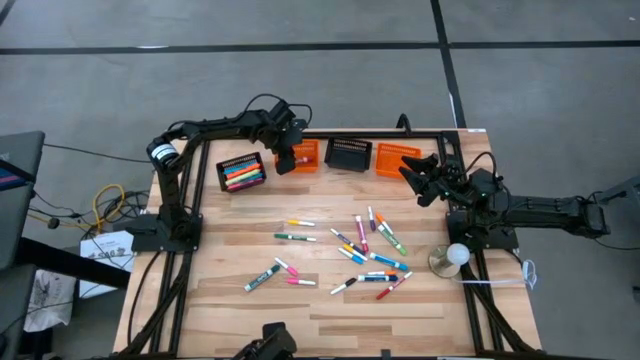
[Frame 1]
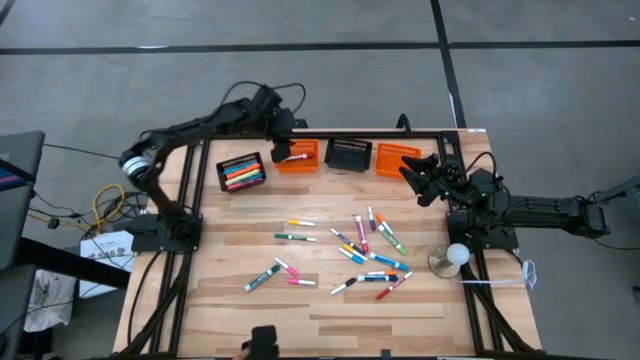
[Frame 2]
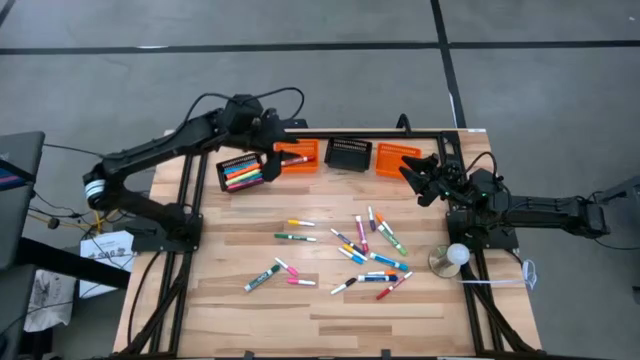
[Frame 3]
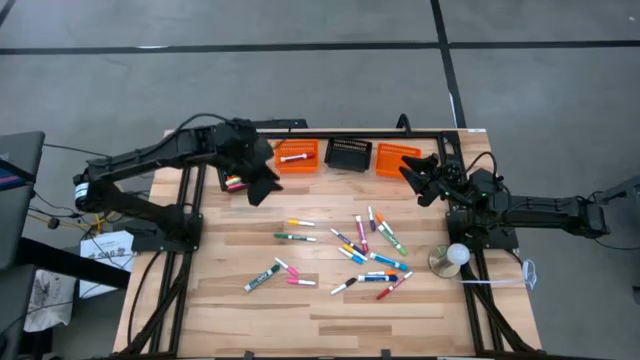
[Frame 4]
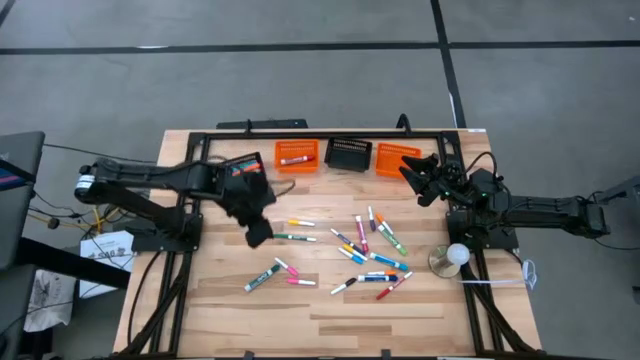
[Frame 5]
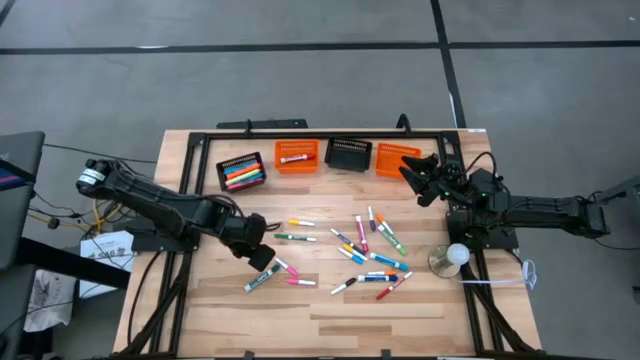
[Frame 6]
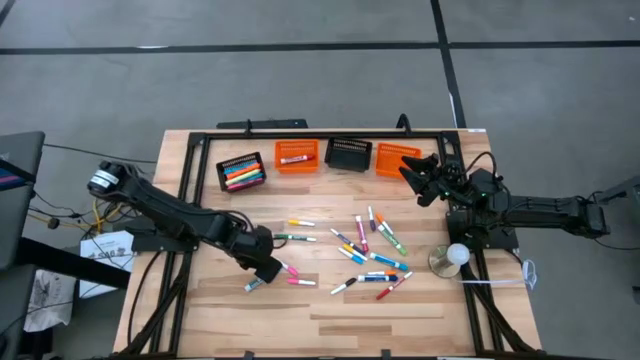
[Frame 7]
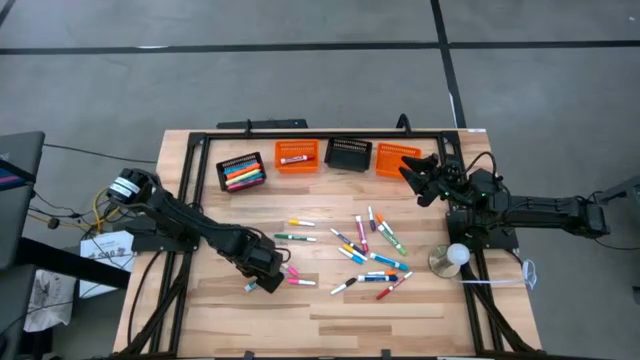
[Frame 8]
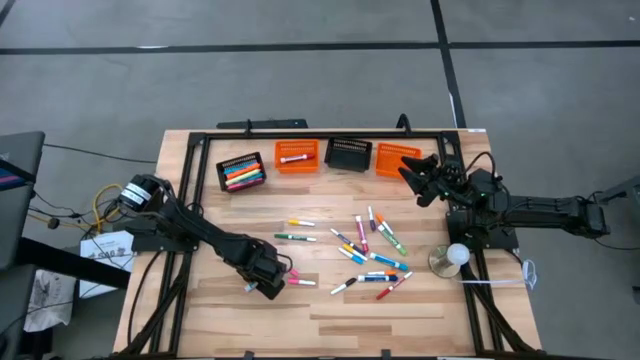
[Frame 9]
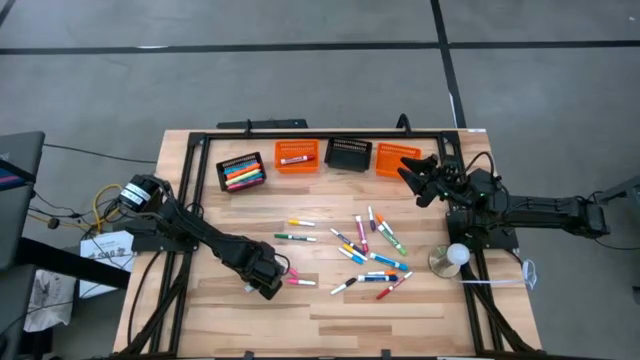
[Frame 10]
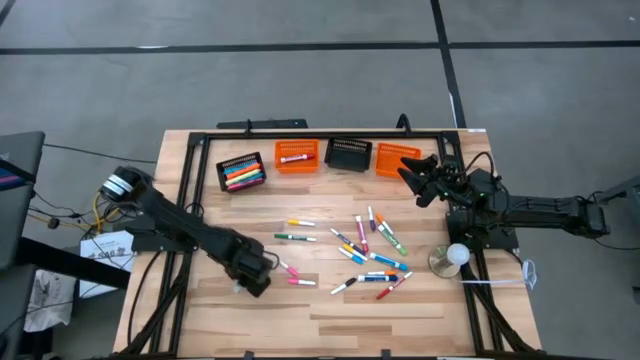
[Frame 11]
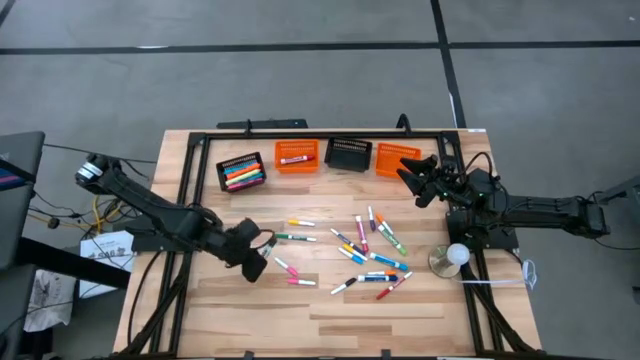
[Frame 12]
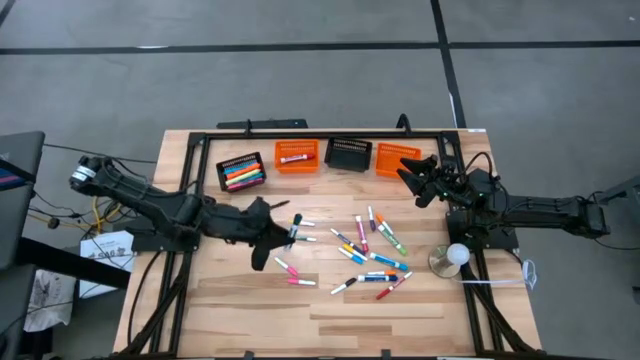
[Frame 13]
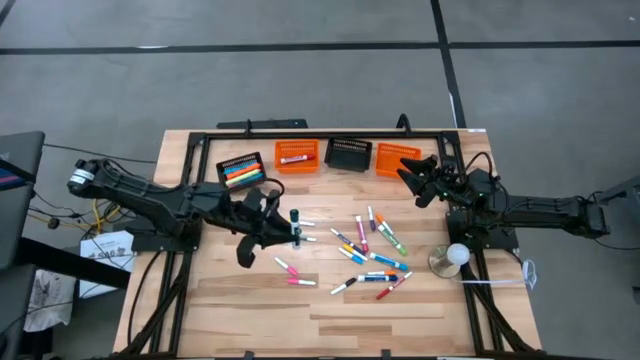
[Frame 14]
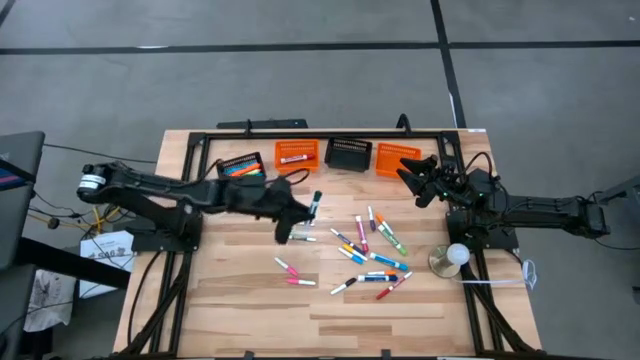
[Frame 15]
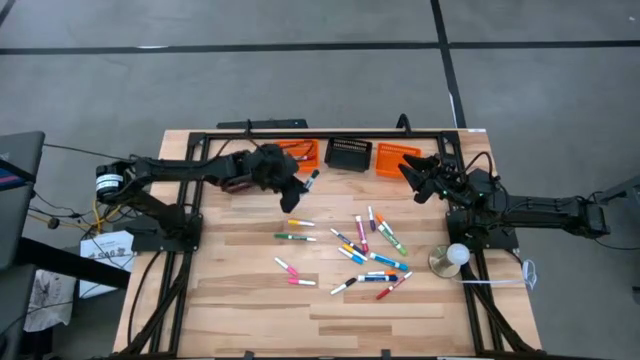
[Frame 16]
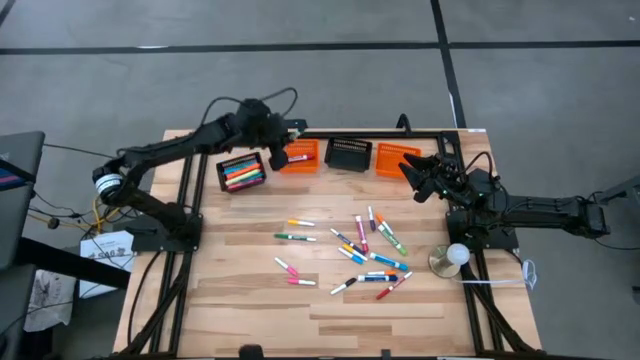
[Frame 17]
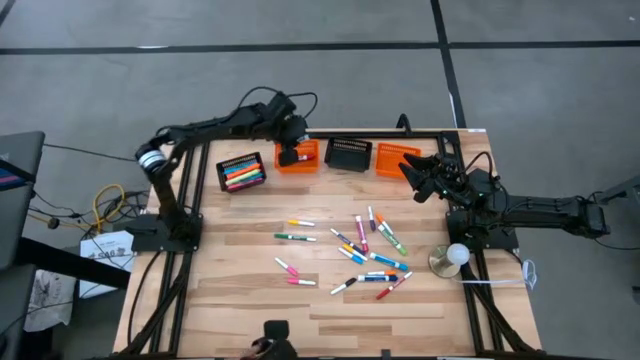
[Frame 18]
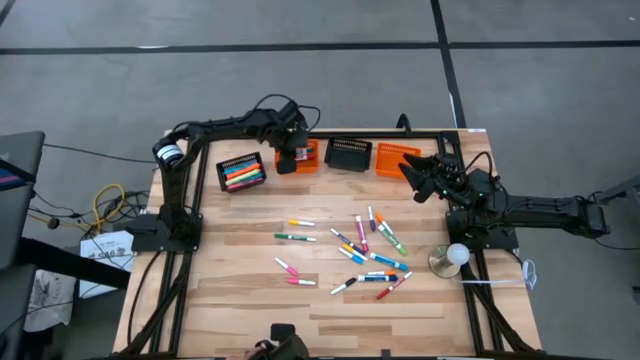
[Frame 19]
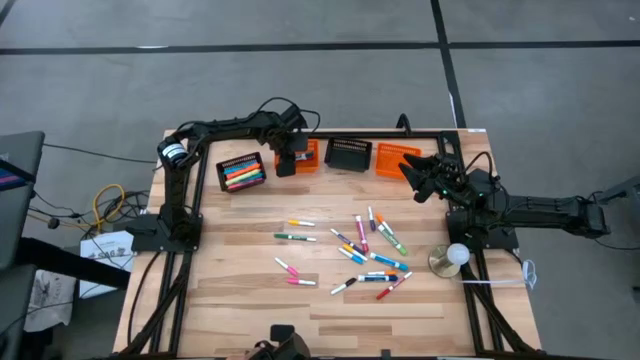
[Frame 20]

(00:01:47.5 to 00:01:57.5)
Task: Pick & Place Markers
Put the large green marker pen into the left orange bin

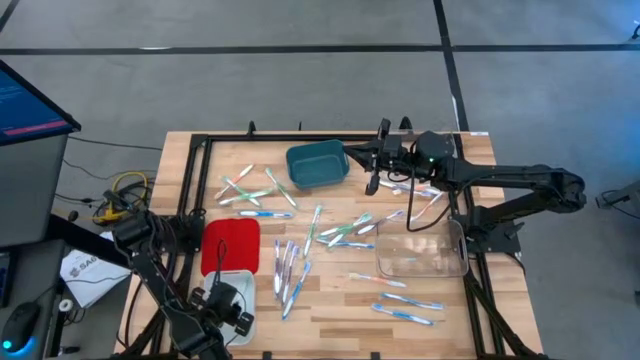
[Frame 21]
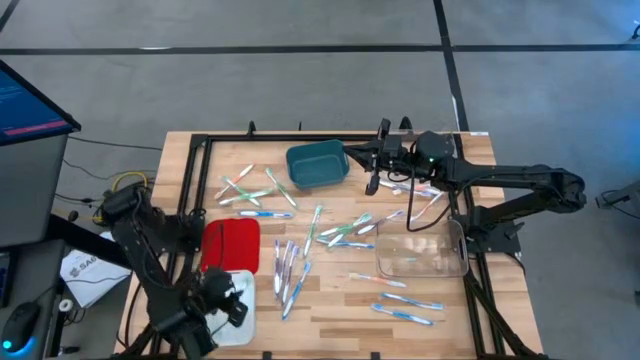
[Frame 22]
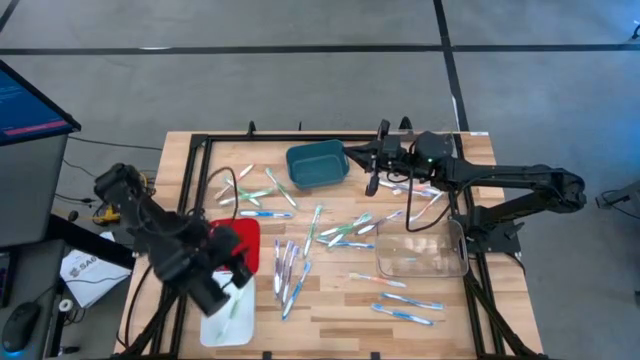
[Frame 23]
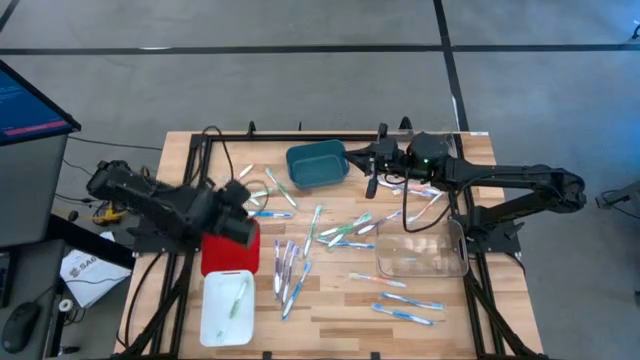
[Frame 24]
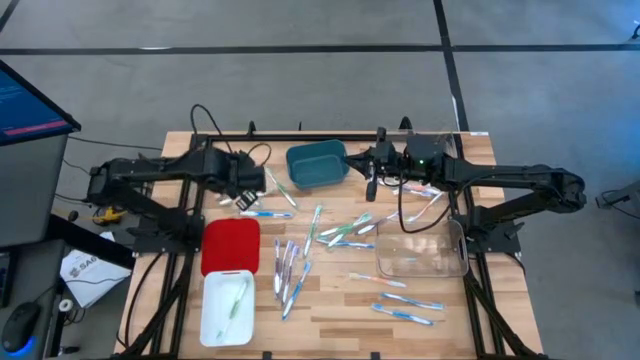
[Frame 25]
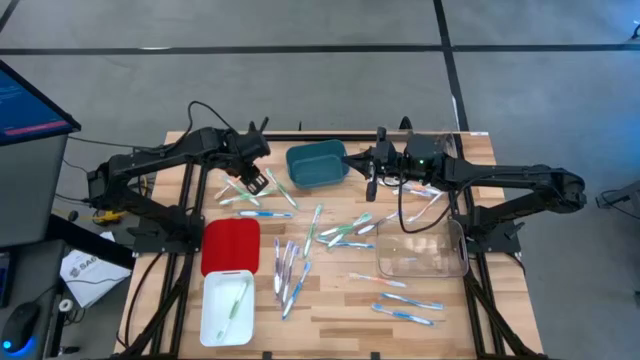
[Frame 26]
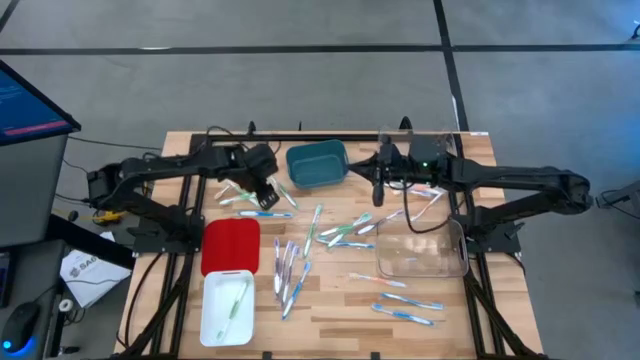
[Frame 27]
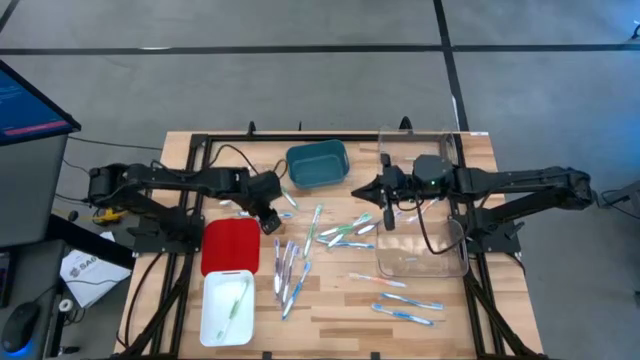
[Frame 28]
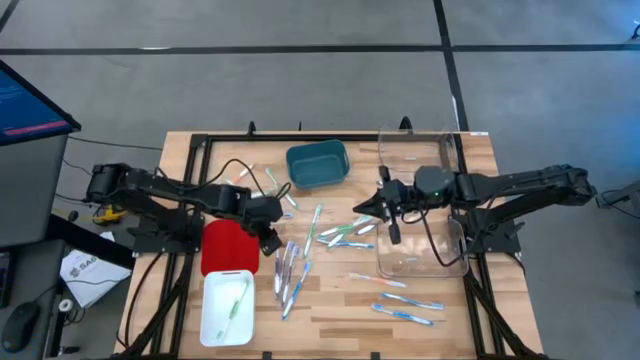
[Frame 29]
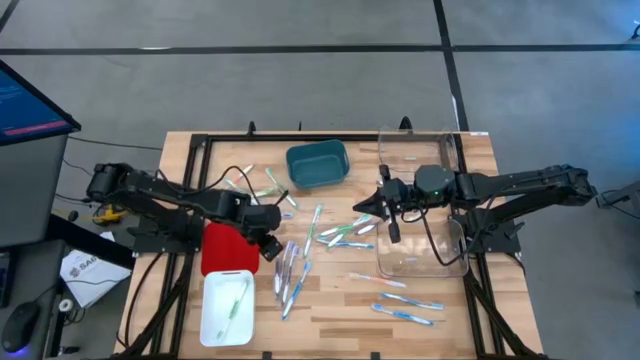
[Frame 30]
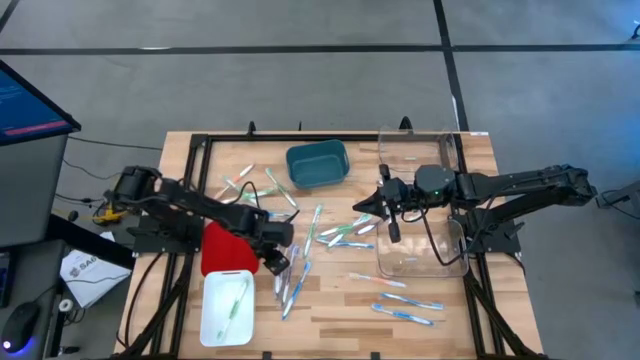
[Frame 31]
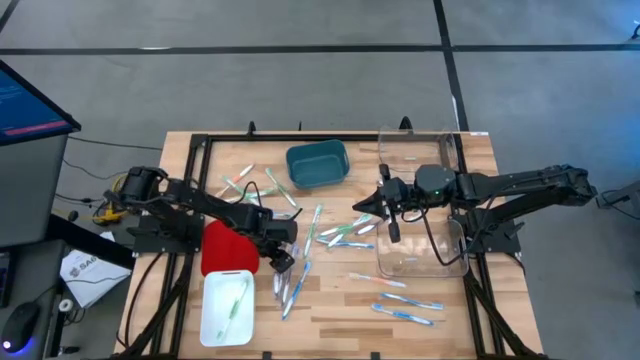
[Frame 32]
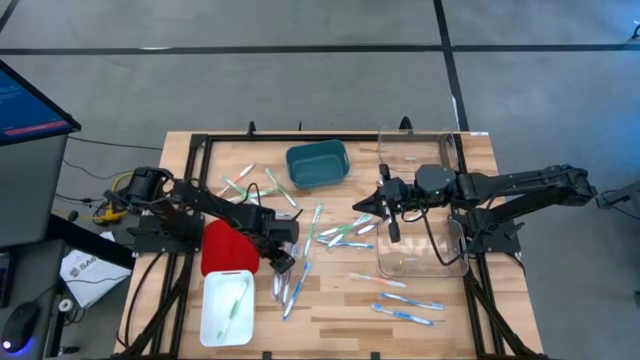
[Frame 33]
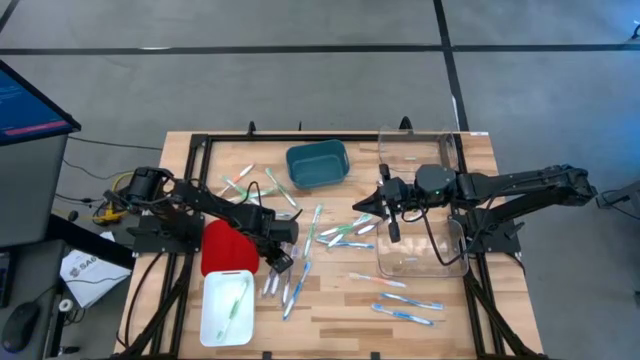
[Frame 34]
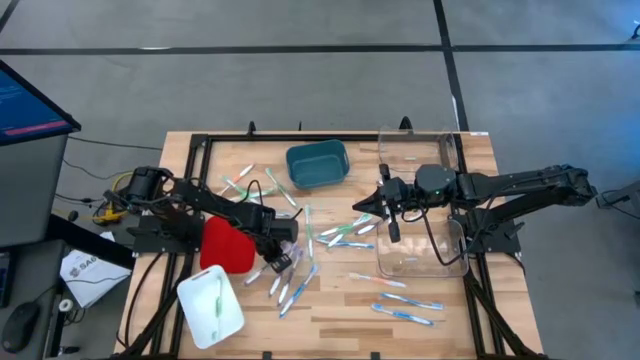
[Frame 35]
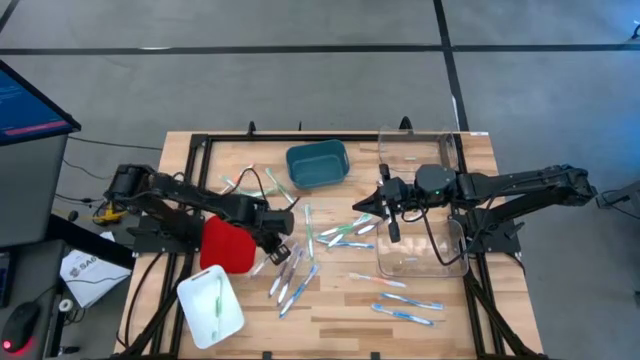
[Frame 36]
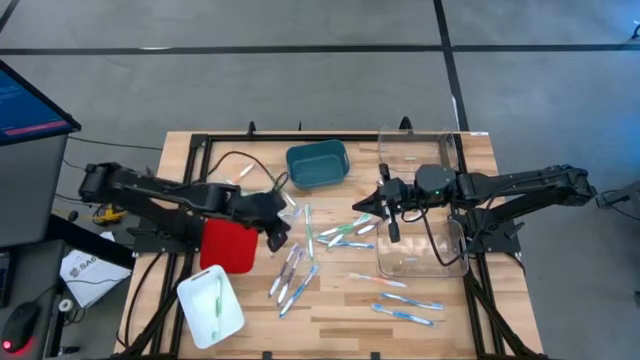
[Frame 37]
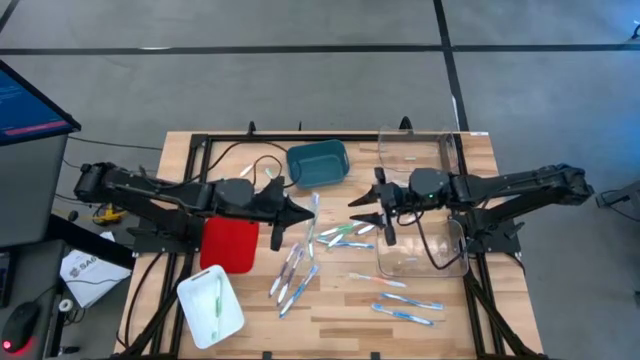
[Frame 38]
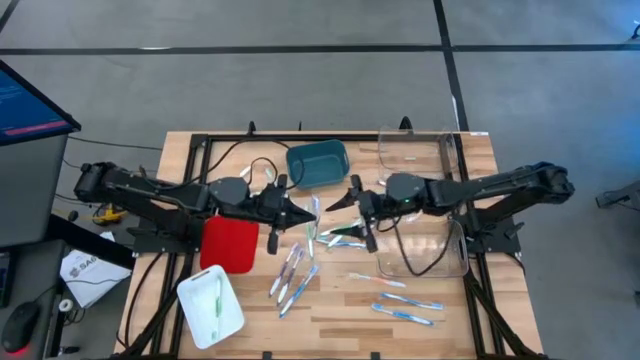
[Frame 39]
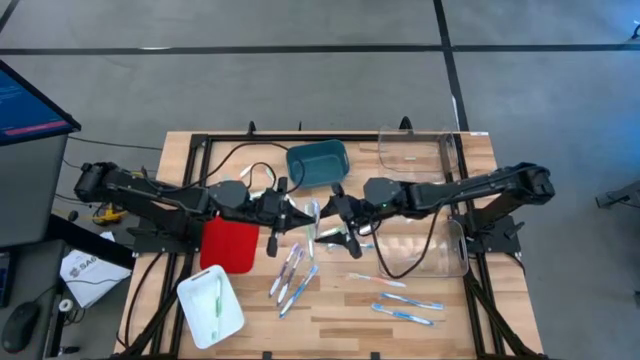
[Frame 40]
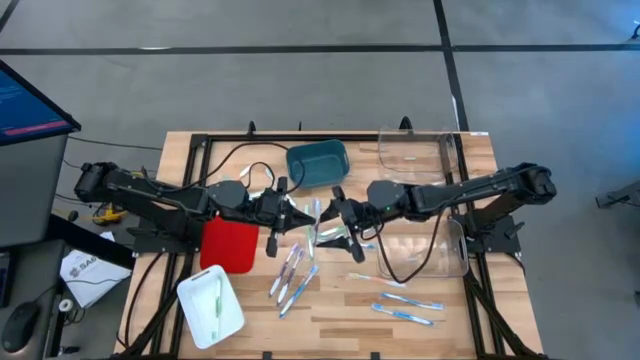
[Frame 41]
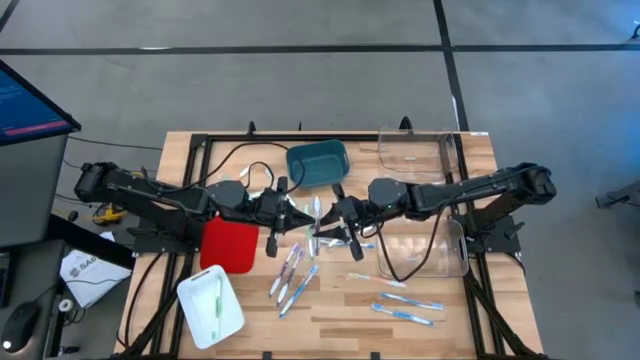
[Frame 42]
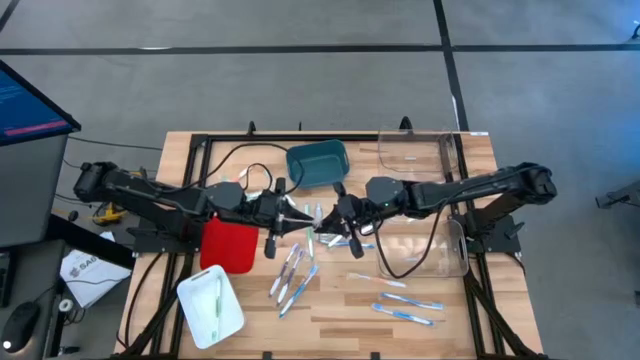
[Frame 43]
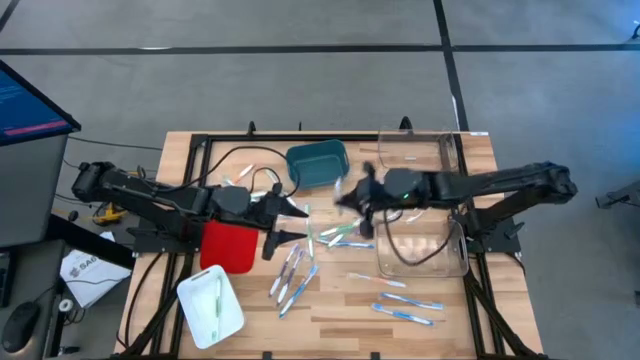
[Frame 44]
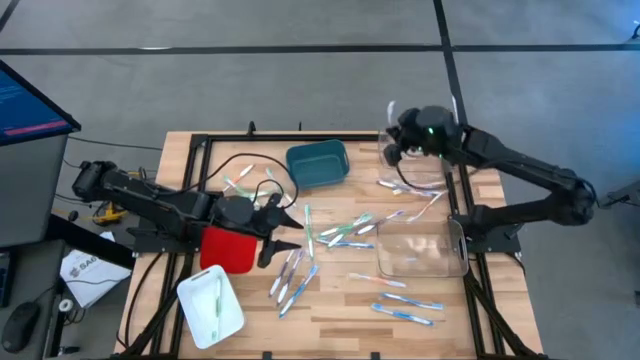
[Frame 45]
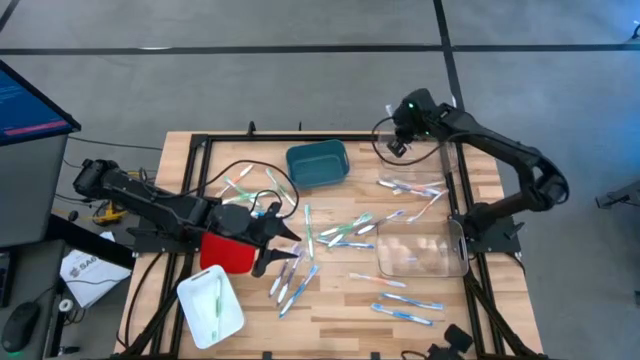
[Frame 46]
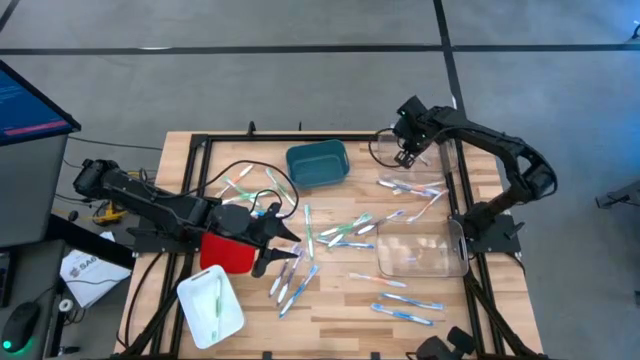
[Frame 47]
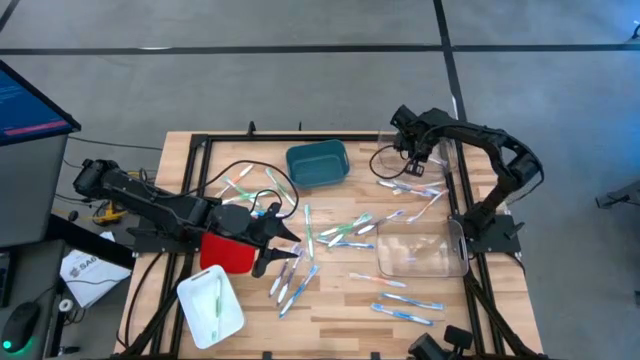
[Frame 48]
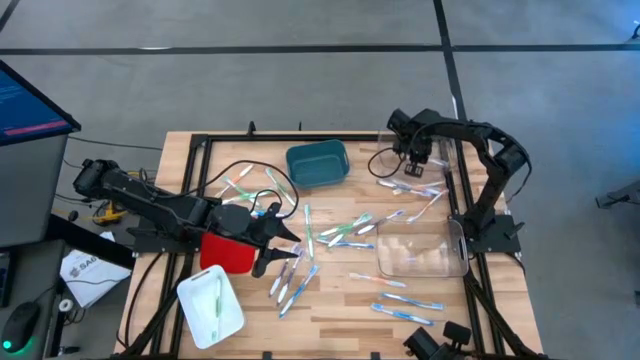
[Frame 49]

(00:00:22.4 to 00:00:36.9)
Task: Pick & Place Toothbrushes
Put the purple toothbrush into the top transparent bin
